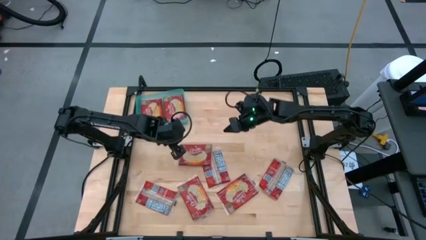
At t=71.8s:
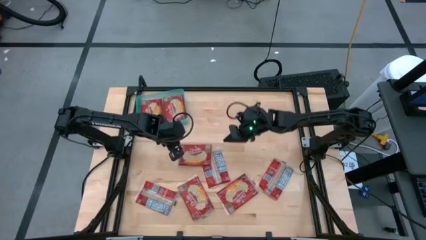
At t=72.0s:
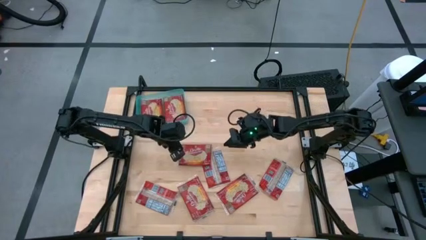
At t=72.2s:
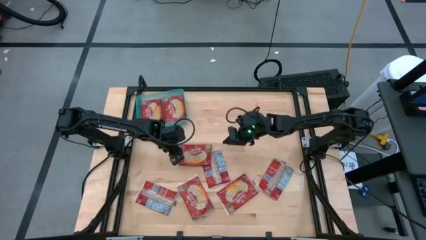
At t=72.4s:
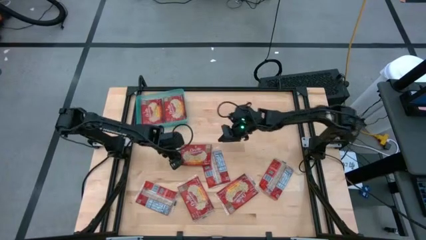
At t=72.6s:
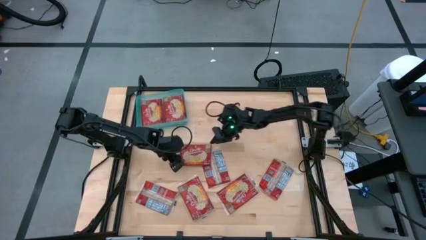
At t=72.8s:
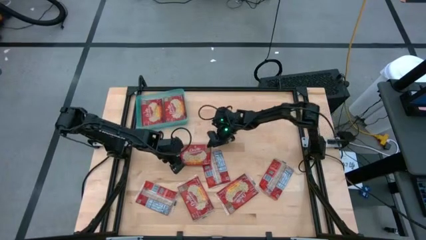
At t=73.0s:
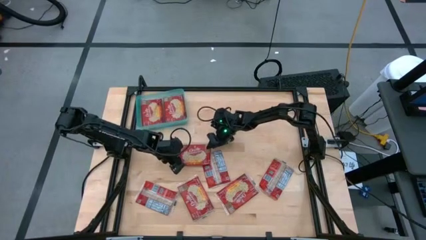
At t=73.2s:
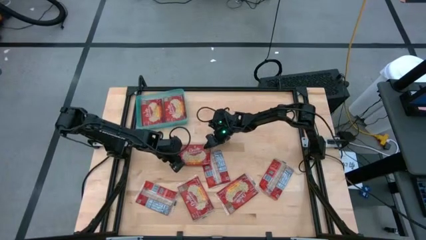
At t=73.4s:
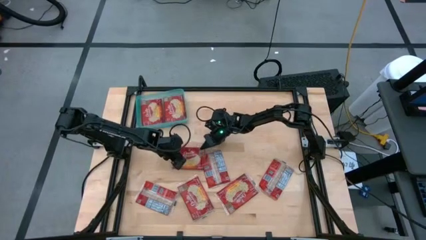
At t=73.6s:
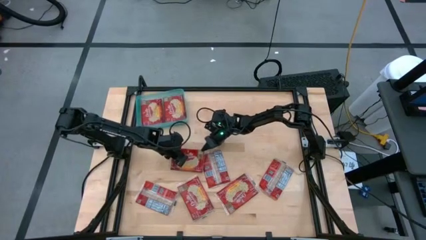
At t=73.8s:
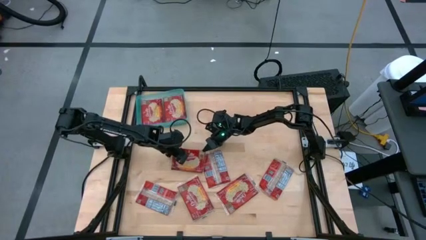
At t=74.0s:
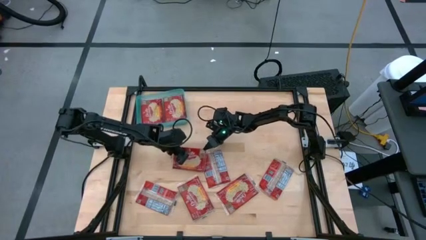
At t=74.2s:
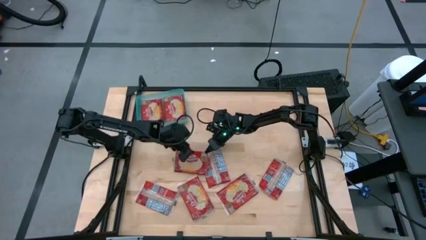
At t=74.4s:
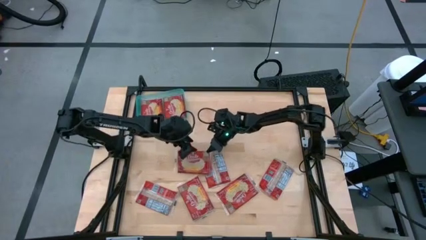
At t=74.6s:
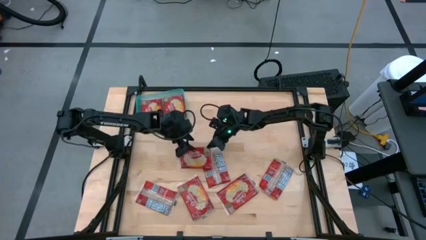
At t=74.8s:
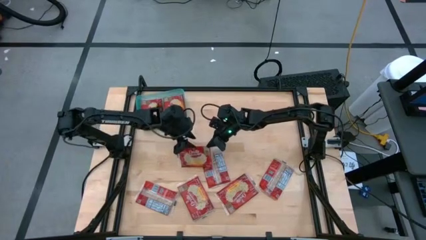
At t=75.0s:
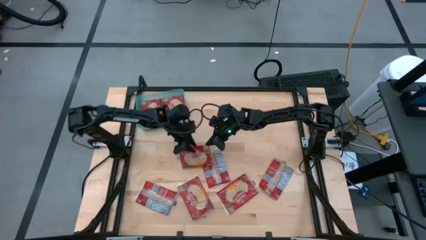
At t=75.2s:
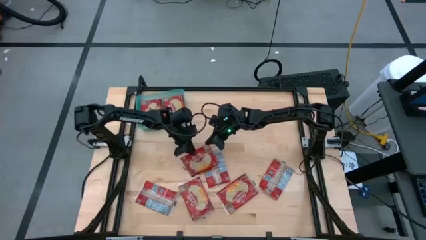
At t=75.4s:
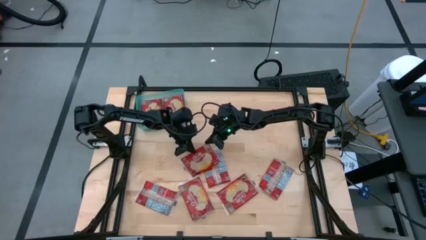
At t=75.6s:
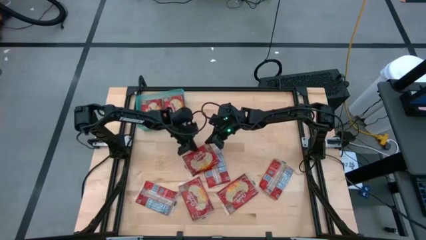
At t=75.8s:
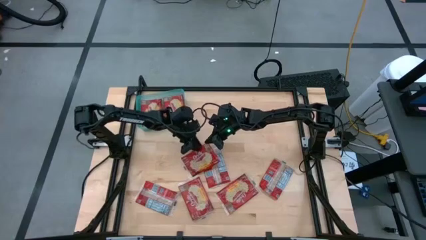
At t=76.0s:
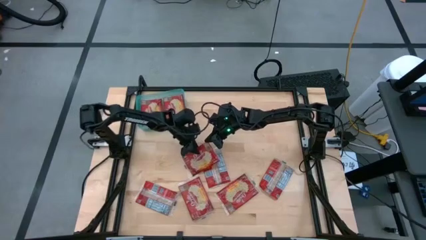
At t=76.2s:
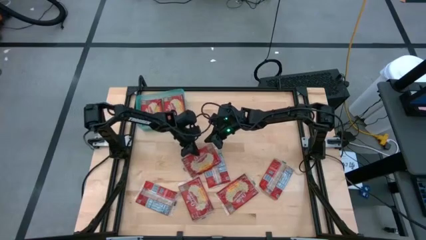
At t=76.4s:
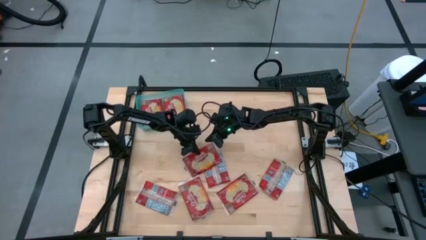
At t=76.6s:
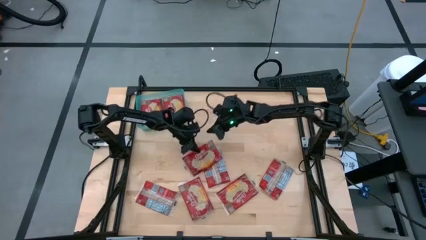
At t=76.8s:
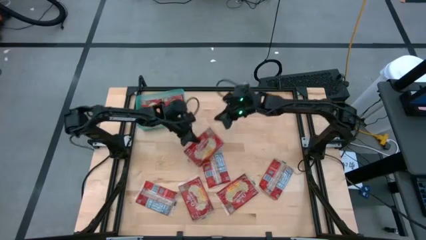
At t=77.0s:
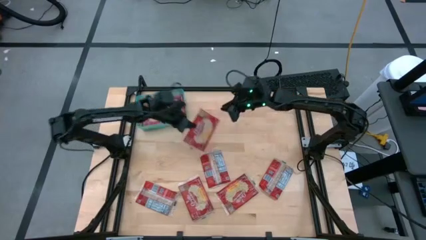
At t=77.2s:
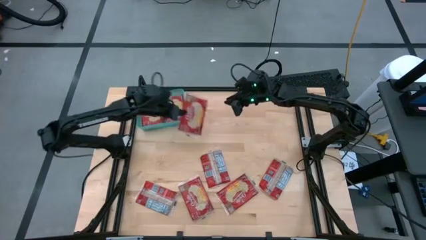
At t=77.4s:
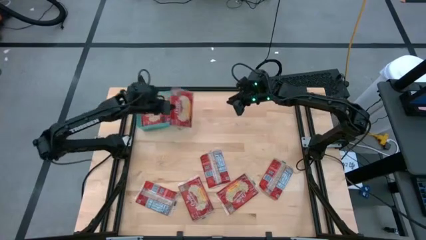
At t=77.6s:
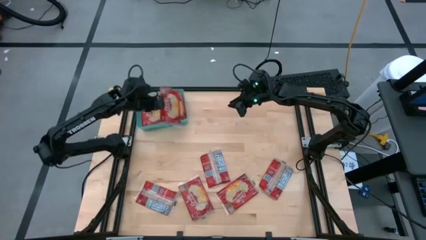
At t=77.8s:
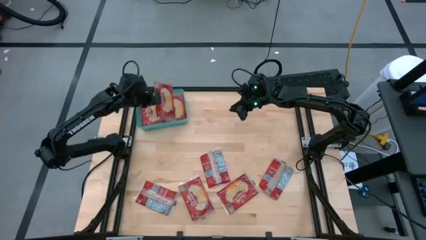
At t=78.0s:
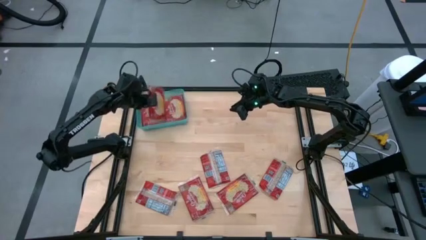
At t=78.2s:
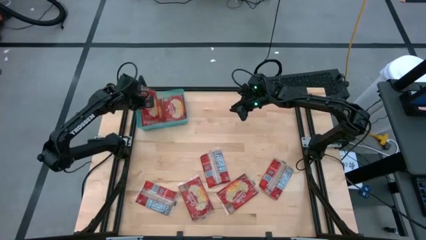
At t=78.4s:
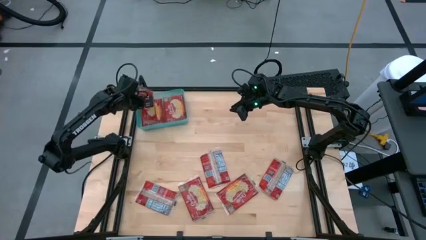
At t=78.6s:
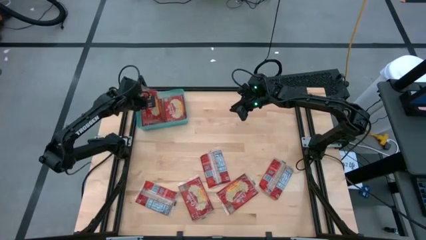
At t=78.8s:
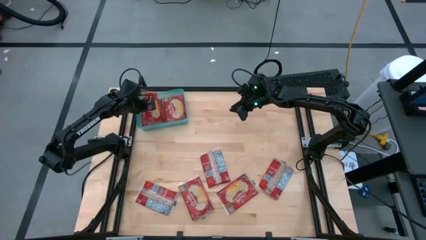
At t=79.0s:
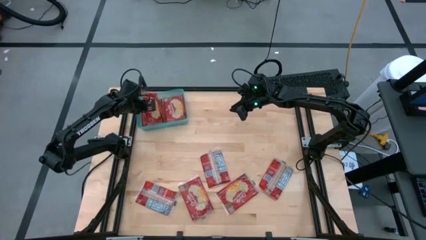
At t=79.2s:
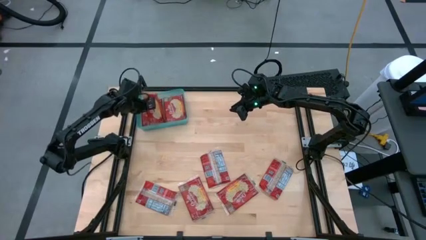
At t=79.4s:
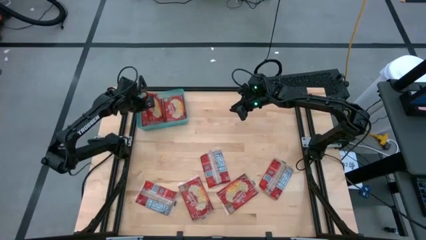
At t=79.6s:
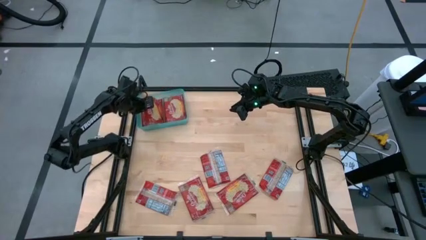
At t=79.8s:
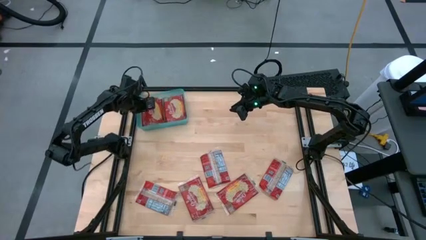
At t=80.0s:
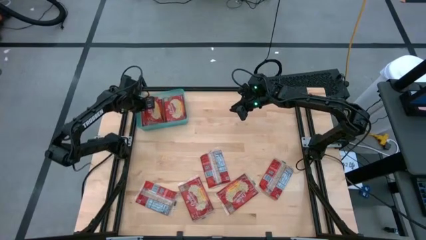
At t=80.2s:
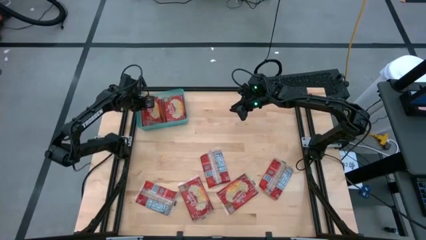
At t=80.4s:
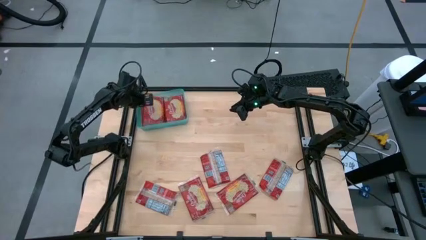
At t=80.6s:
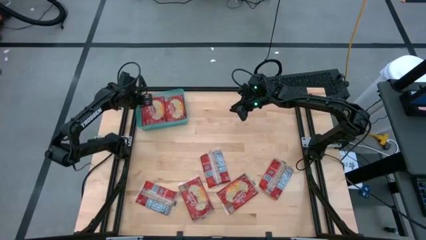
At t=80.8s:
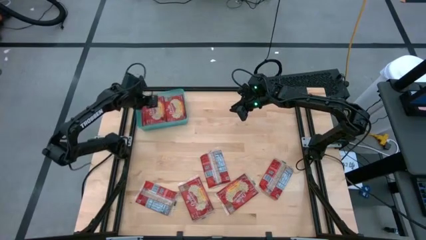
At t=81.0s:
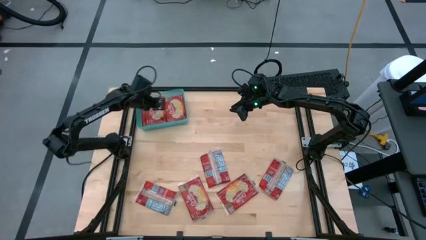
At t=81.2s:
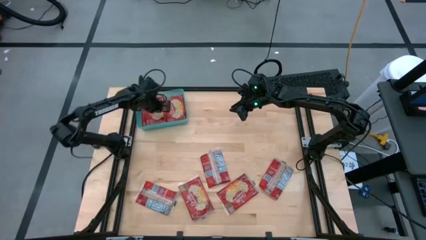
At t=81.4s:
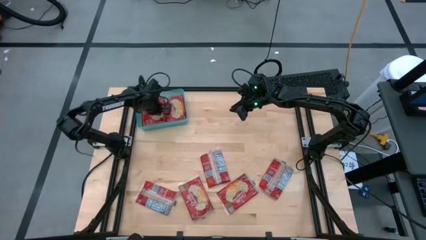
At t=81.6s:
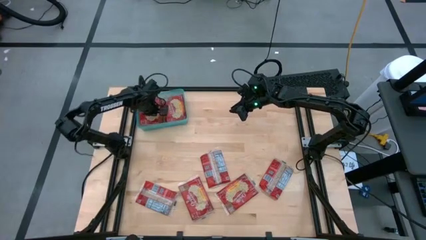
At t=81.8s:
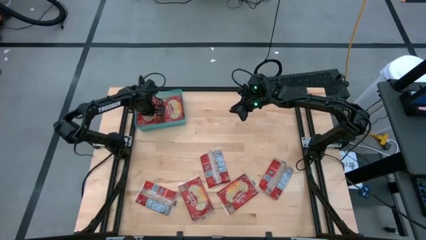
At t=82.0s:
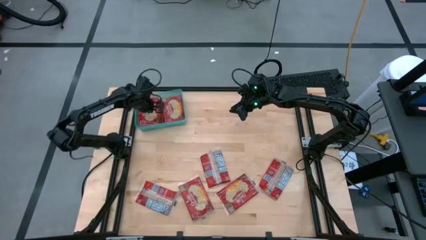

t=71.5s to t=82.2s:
Task: Sort popcorn bags into baskets
Put the red popcorn bag into the blue bin

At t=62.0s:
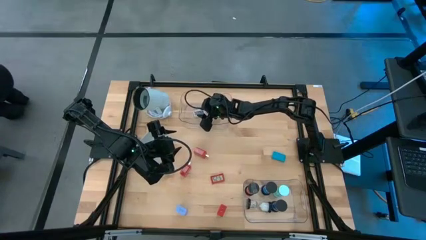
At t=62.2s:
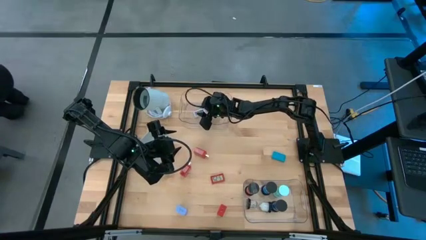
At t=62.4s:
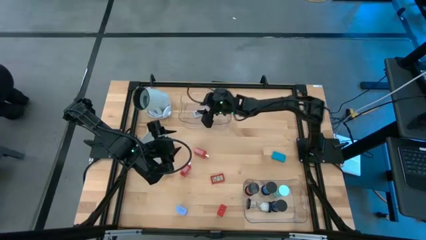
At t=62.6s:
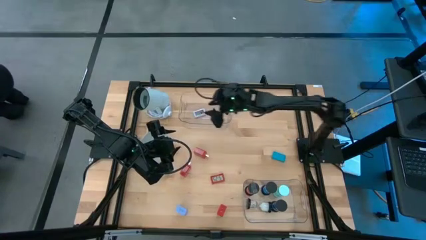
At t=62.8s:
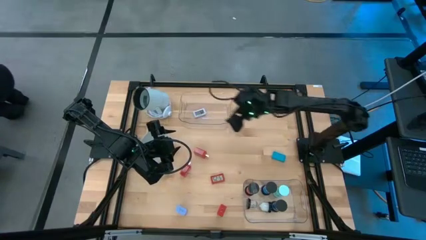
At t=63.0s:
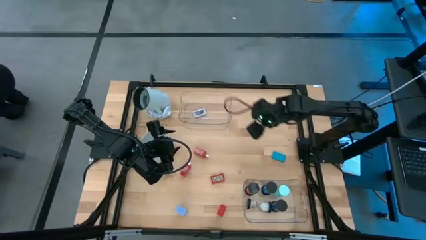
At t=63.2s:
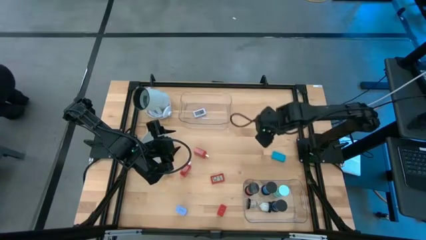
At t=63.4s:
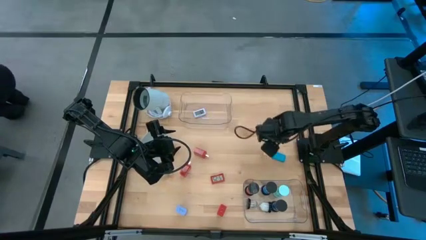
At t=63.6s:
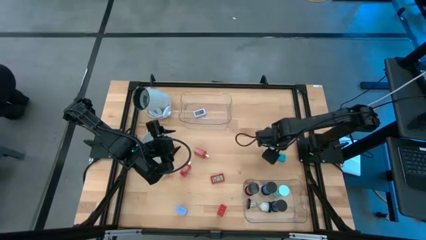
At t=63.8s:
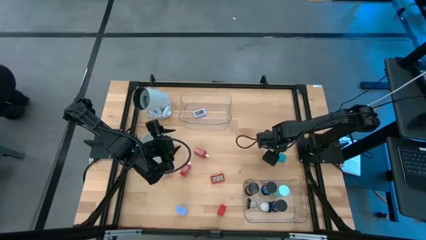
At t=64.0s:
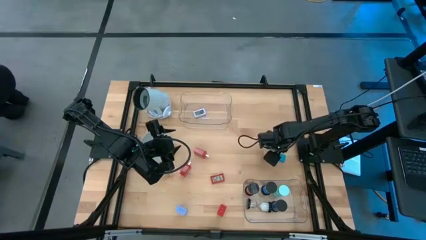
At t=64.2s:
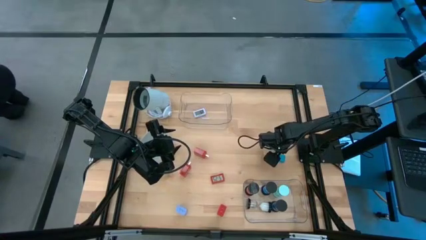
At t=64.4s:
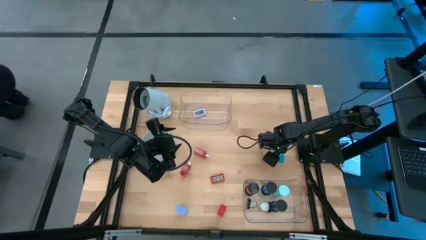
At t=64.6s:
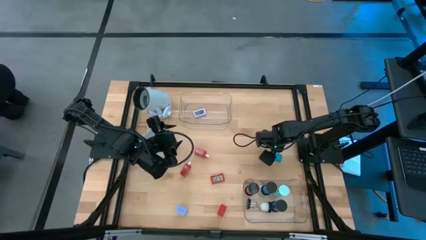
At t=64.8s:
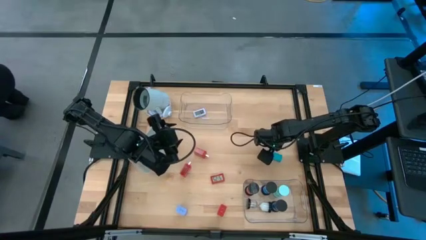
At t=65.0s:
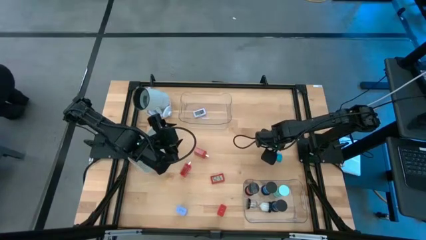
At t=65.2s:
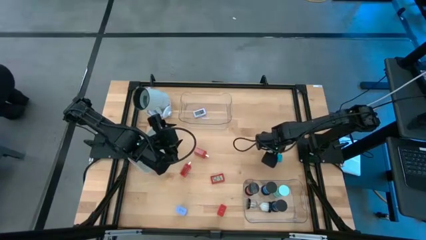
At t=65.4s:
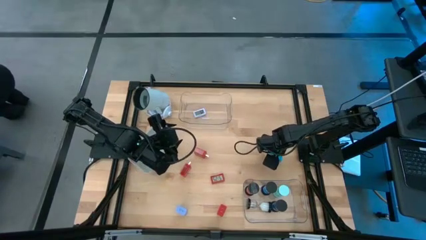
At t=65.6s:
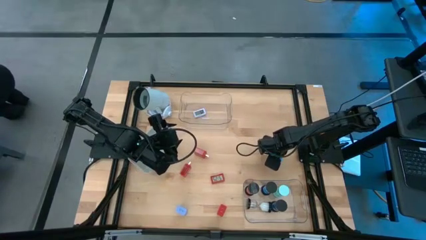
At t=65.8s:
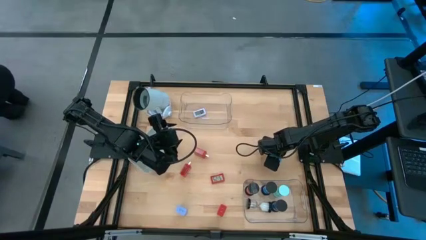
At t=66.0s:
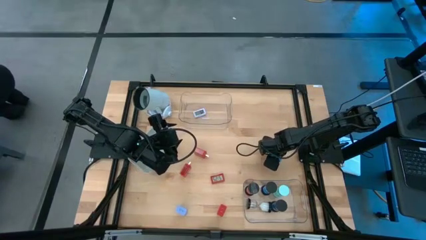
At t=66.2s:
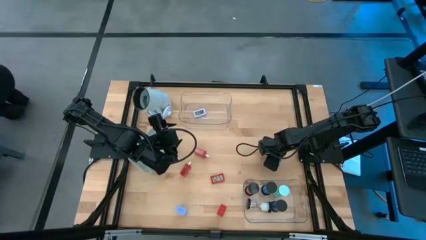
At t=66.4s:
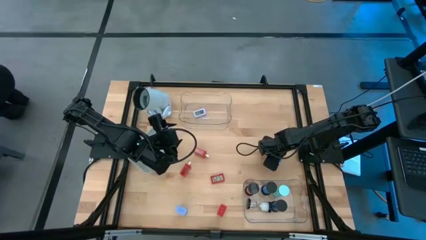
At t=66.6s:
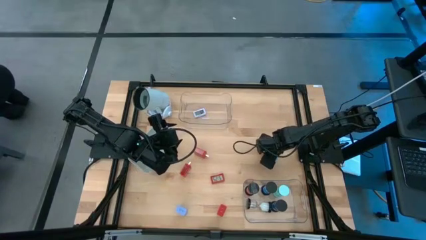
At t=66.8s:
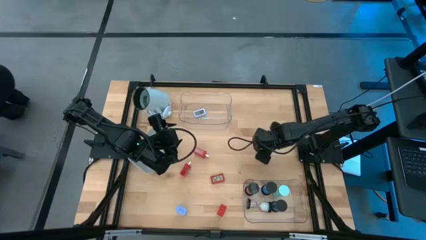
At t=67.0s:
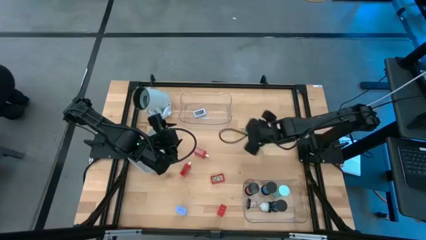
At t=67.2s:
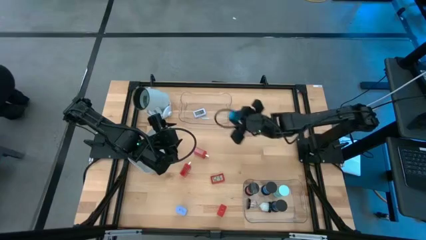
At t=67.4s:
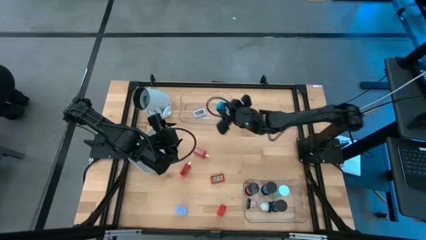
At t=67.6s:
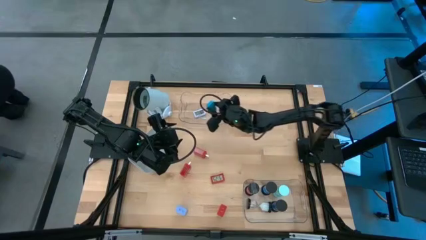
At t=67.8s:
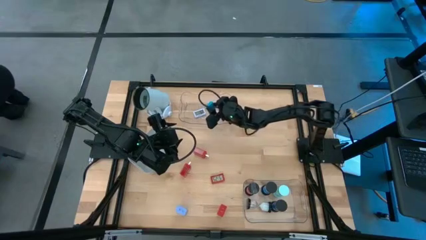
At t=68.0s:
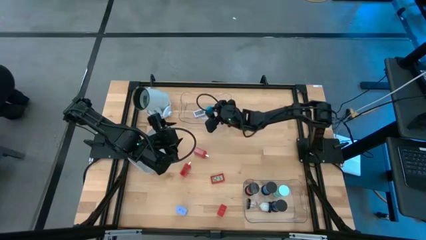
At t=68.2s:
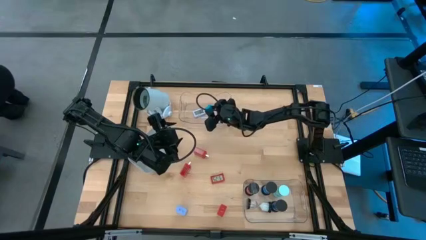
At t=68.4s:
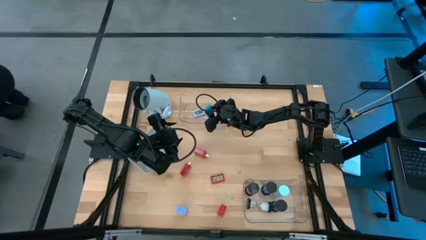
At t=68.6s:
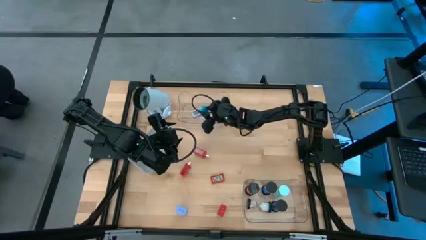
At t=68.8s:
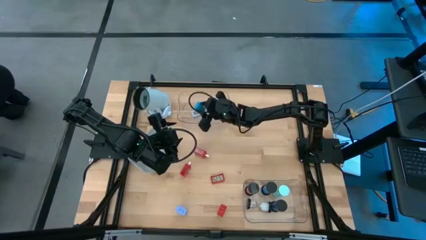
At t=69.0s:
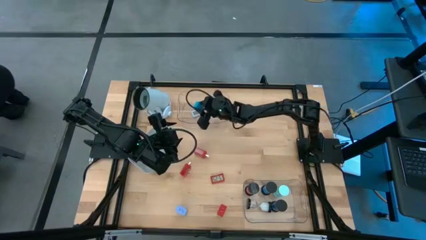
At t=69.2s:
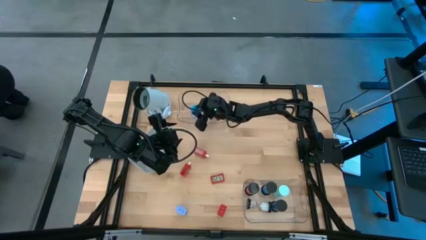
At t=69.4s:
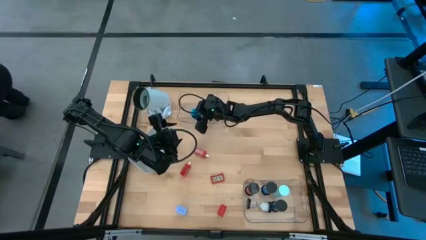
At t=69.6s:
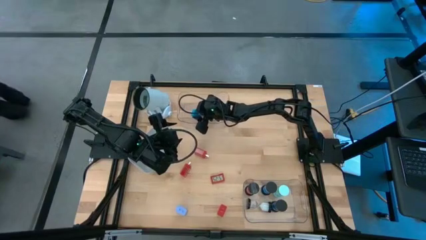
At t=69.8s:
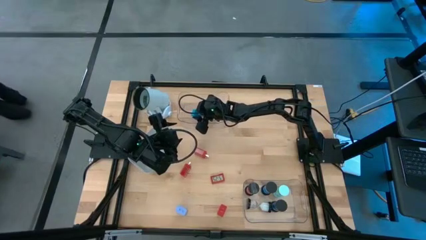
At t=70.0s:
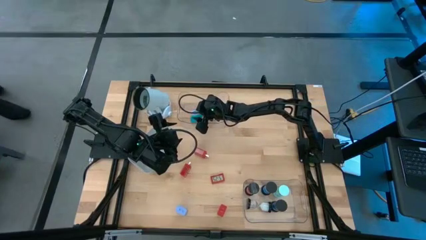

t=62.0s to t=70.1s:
Task: Pick & Place Office items
Put the light blue digital clock into the top transparent bin
